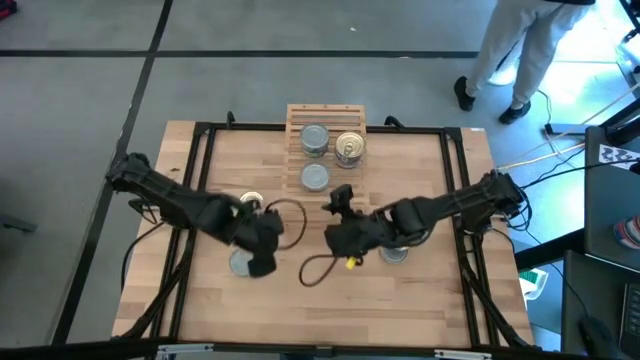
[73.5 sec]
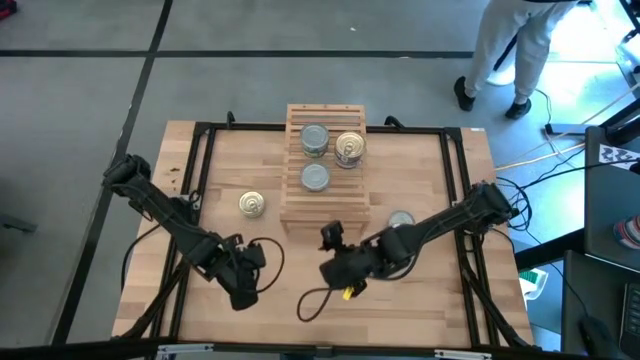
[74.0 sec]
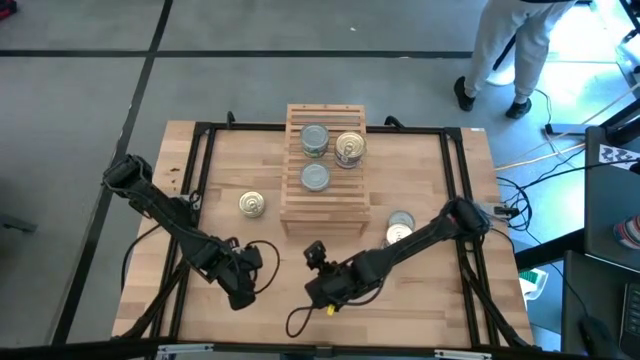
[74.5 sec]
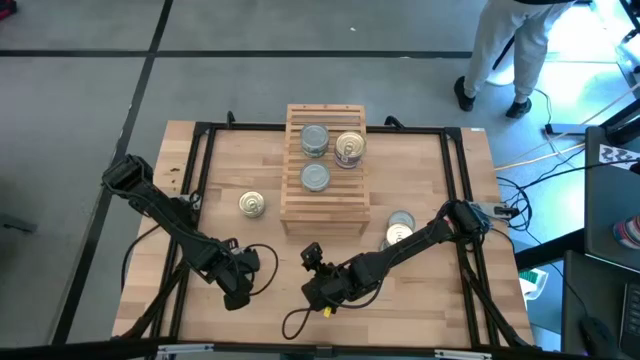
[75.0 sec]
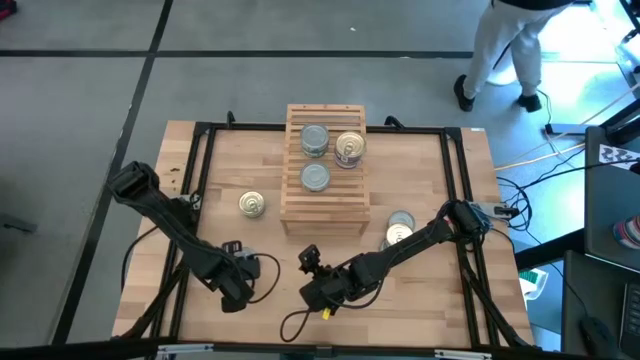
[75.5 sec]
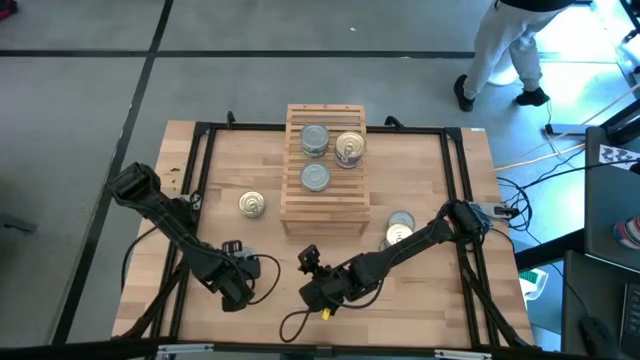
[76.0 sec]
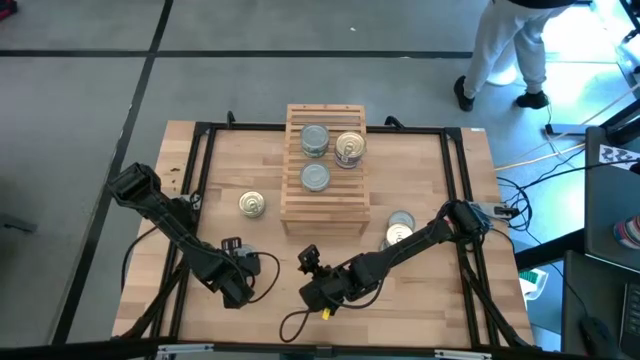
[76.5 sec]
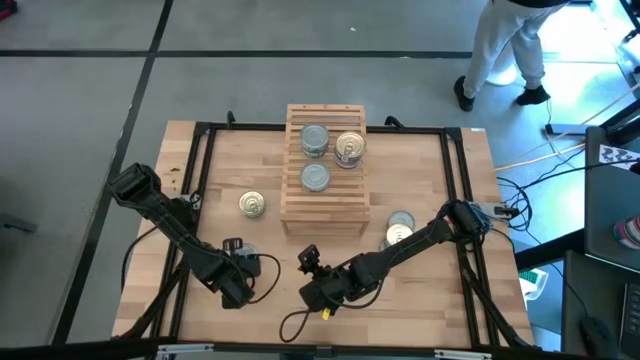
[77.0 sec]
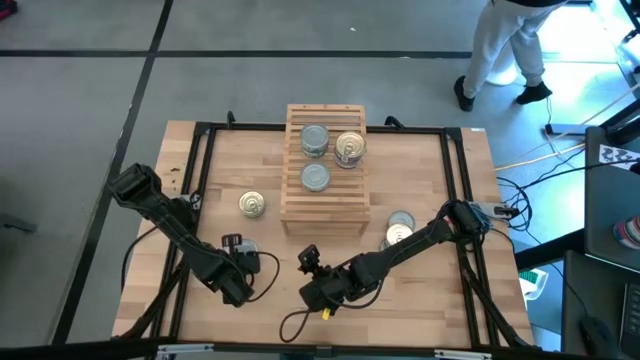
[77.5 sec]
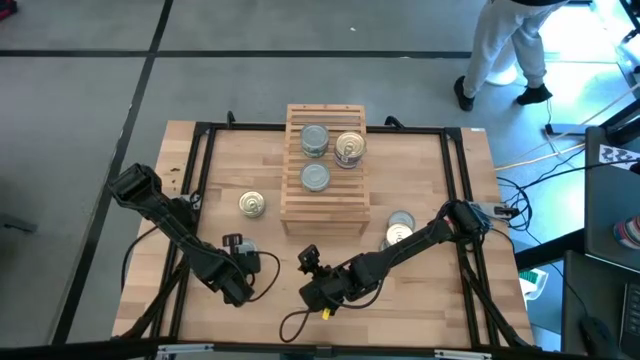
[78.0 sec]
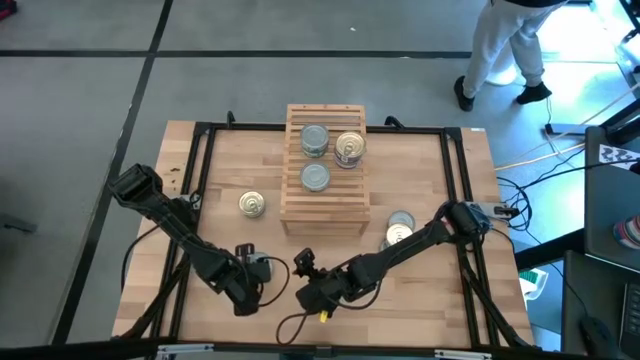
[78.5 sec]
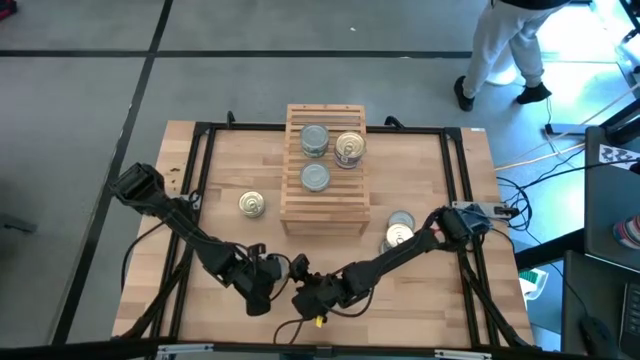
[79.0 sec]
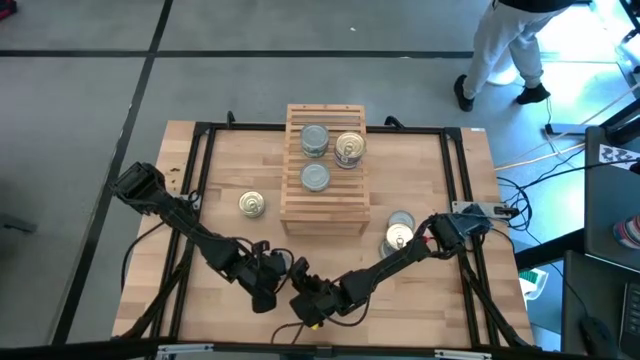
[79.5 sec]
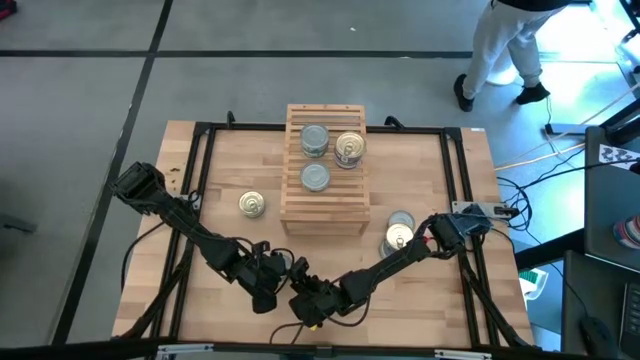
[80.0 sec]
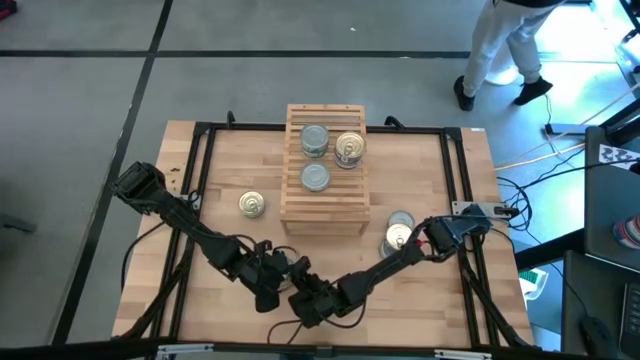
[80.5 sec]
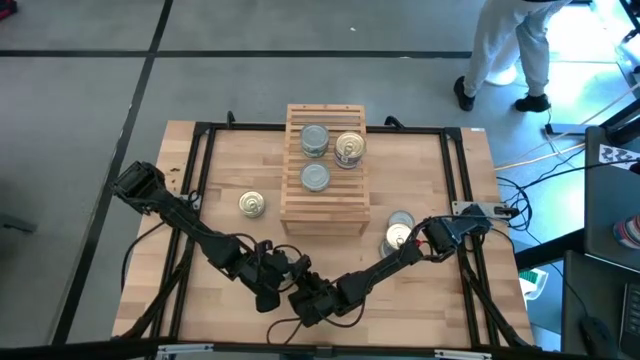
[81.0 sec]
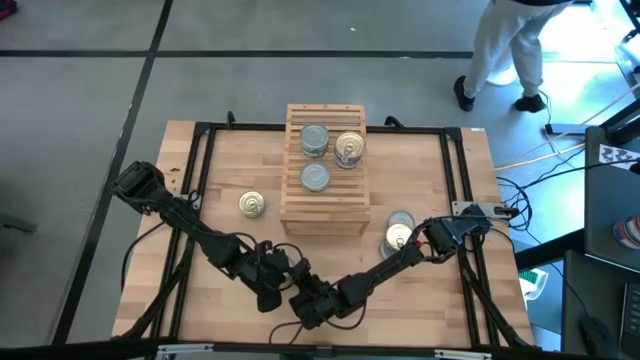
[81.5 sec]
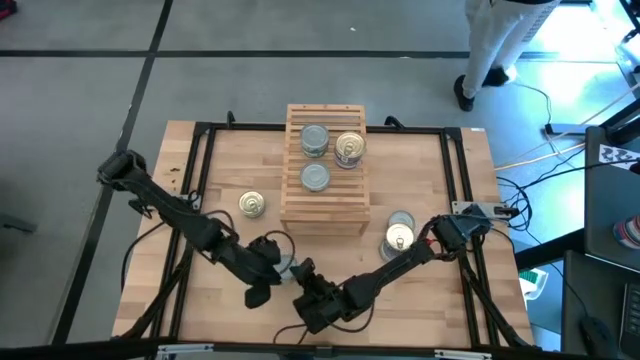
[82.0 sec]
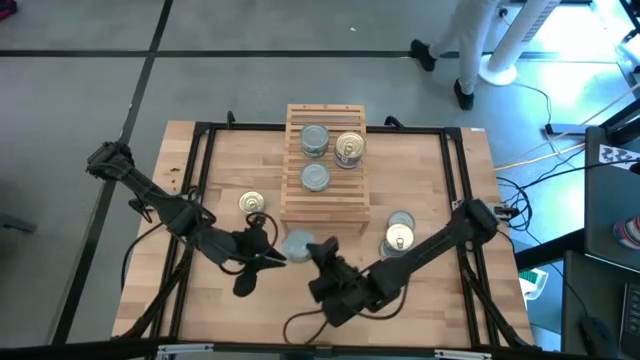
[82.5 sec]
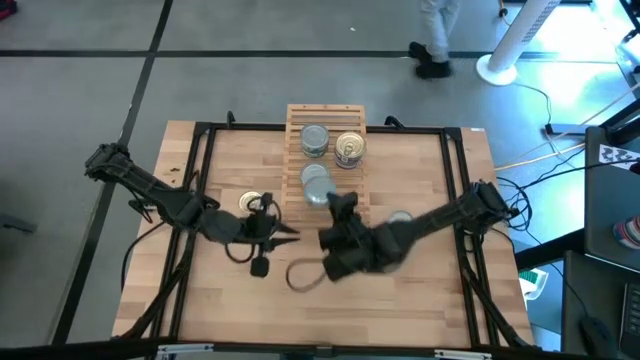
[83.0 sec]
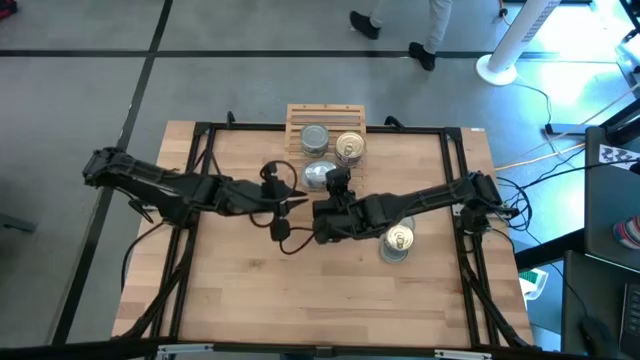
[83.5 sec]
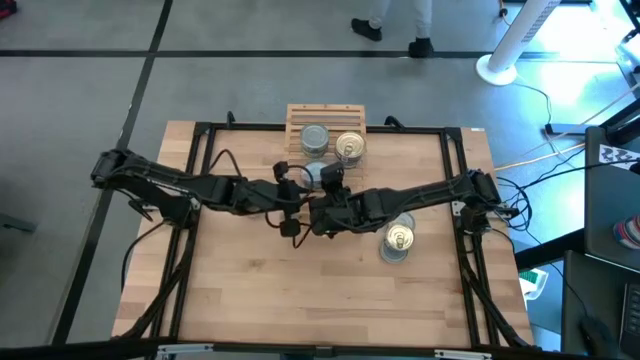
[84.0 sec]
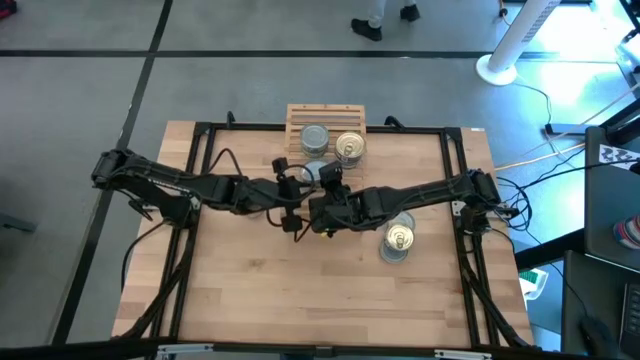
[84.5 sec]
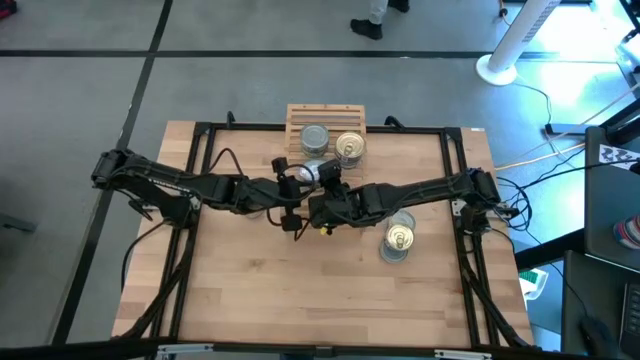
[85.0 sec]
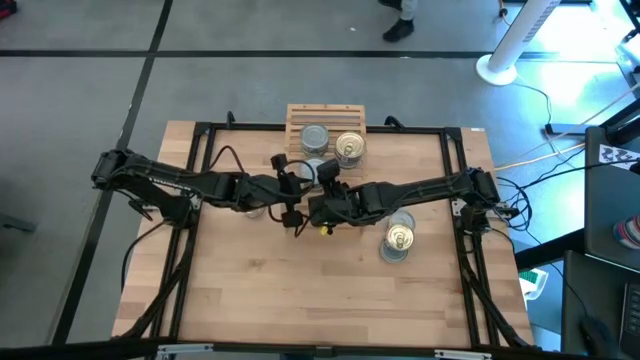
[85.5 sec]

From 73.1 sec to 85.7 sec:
Task: Stack canned seafood by type on shelf
Stack the green tuna can on top of the green tuna can on the shelf

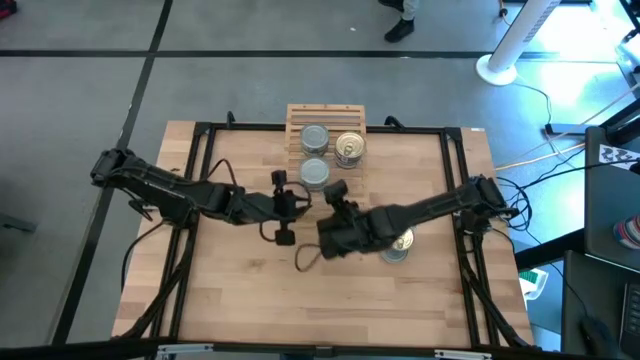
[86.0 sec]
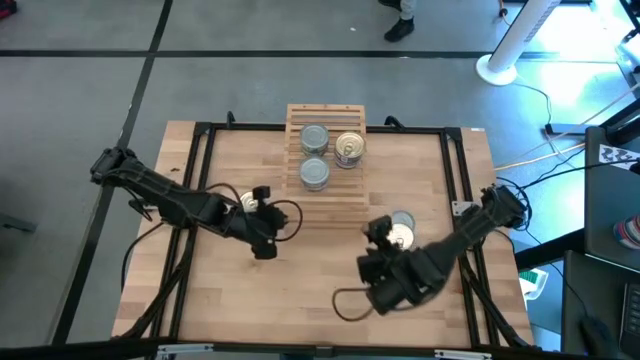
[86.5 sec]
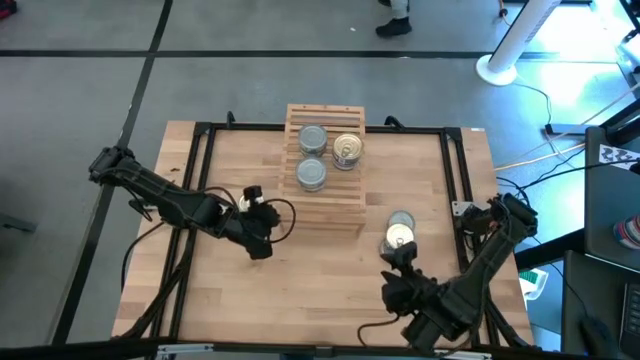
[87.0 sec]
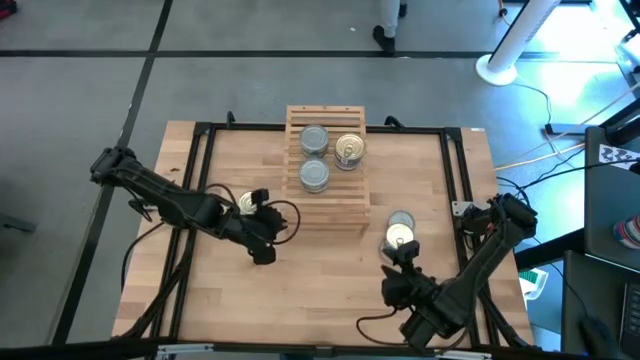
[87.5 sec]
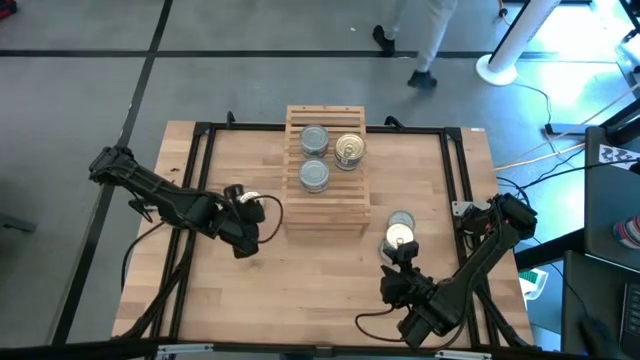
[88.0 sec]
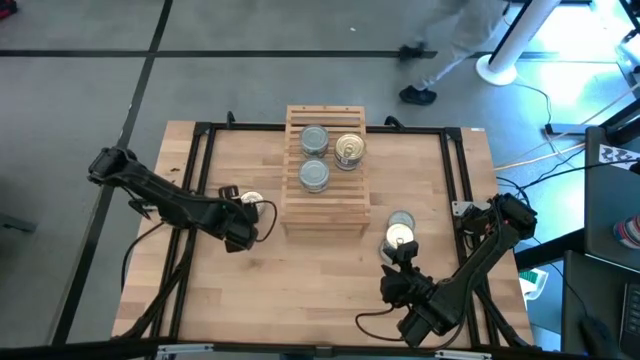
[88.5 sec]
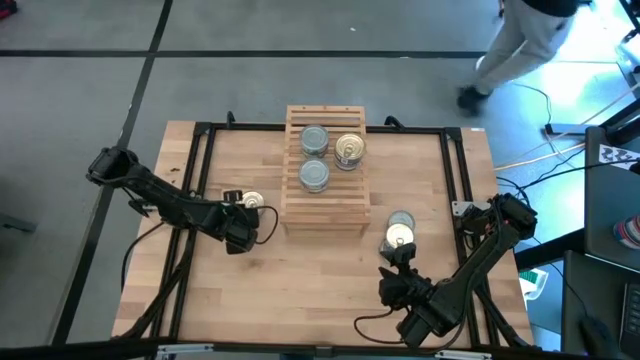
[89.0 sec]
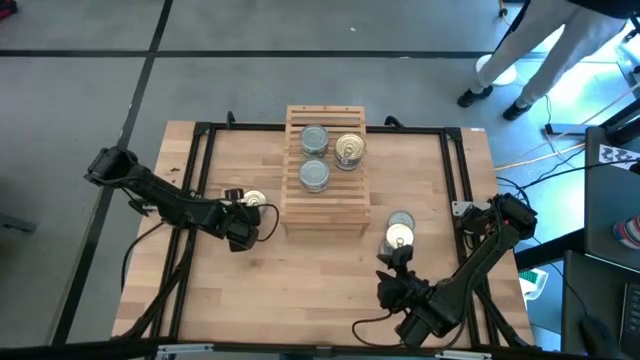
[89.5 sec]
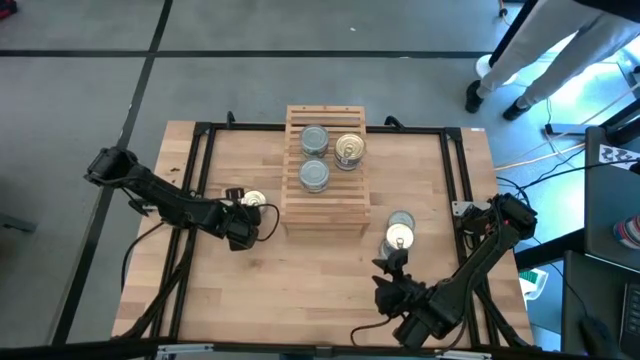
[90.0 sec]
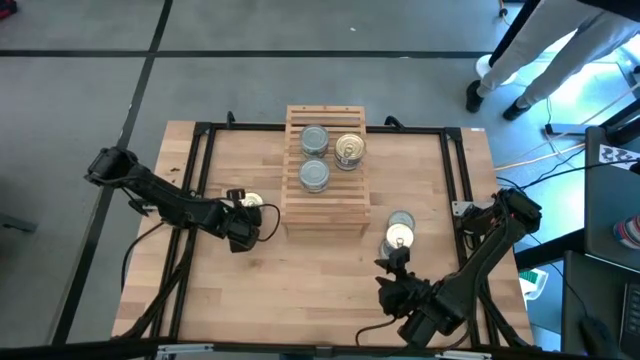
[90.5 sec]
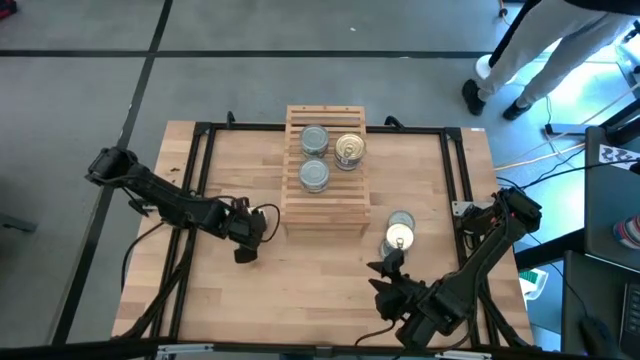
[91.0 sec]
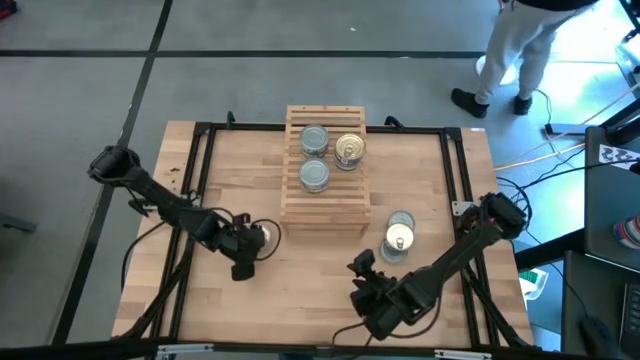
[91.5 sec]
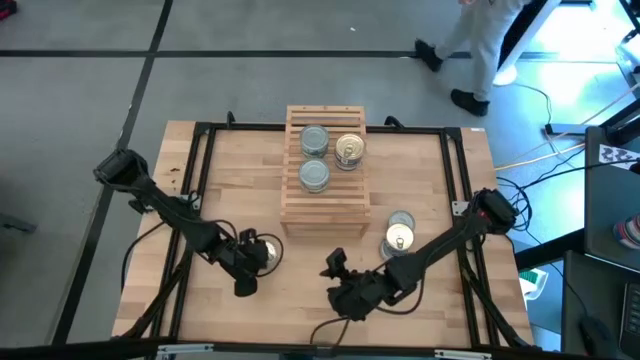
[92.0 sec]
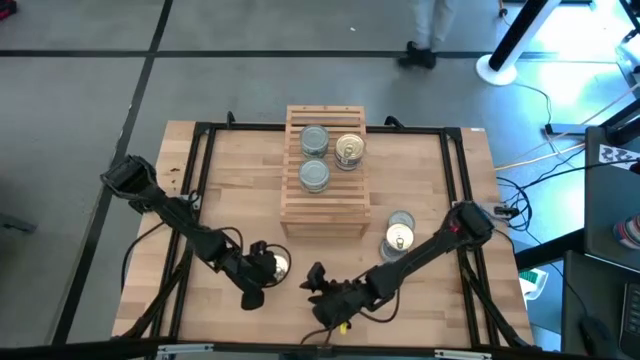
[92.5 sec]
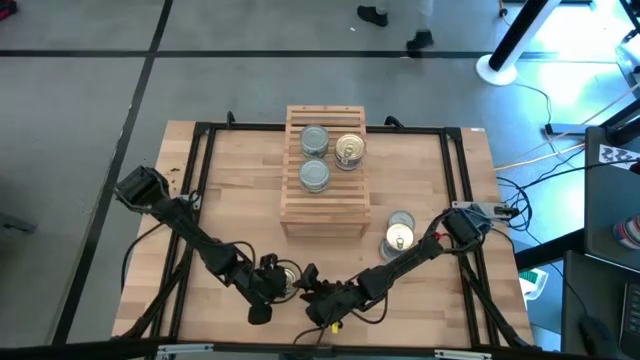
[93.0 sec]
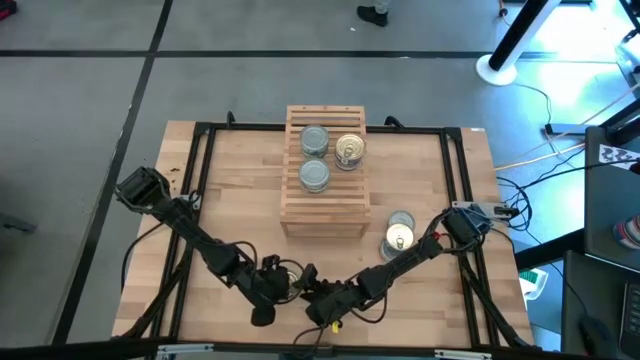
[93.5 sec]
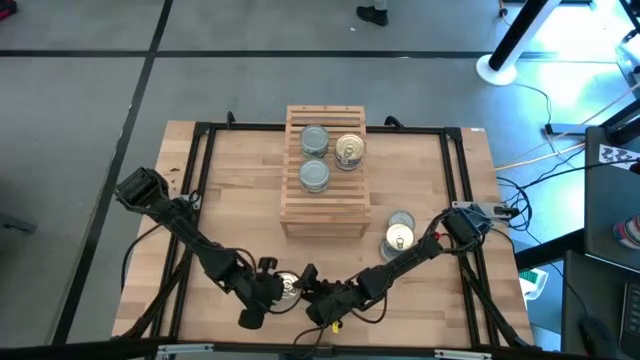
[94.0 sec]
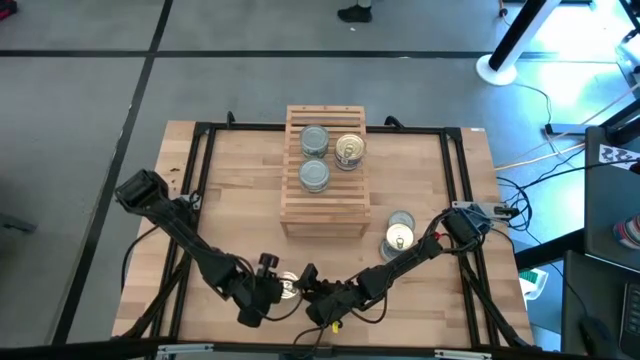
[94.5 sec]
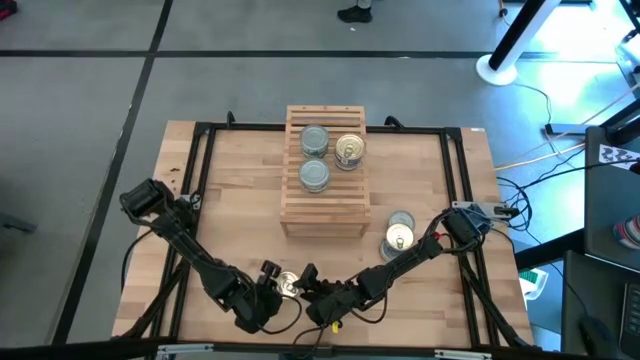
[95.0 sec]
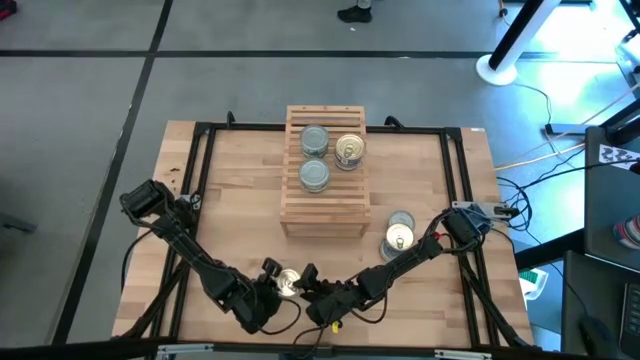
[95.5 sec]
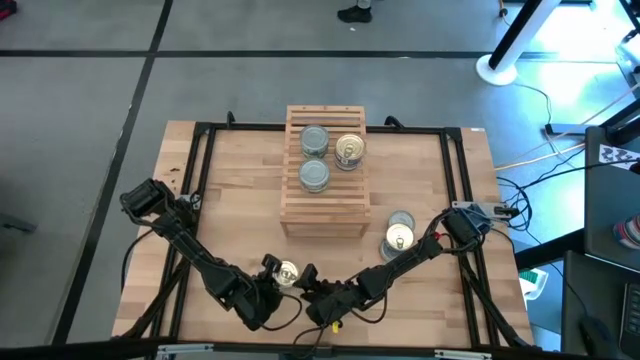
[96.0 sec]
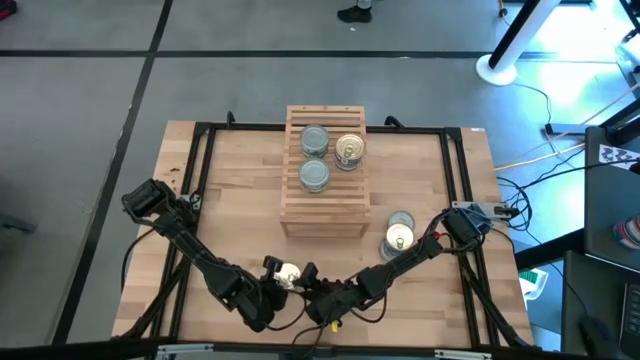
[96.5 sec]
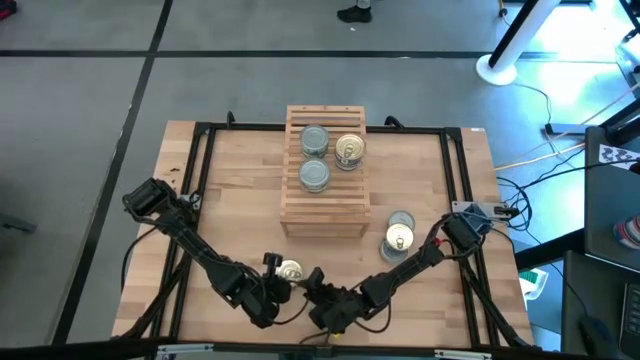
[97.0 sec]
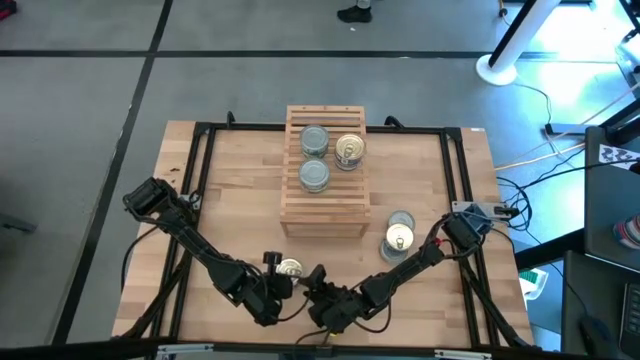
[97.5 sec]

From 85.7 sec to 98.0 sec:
Stack the blue tuna can on top of the blue tuna can on the shelf
